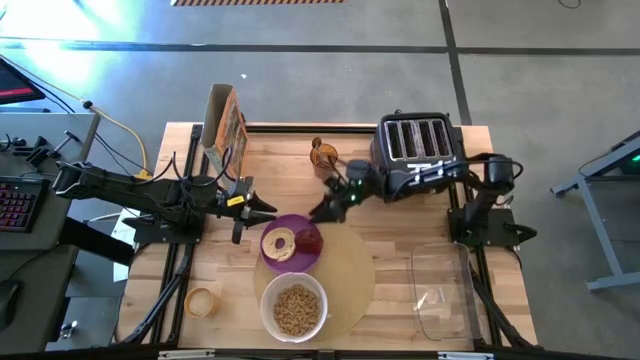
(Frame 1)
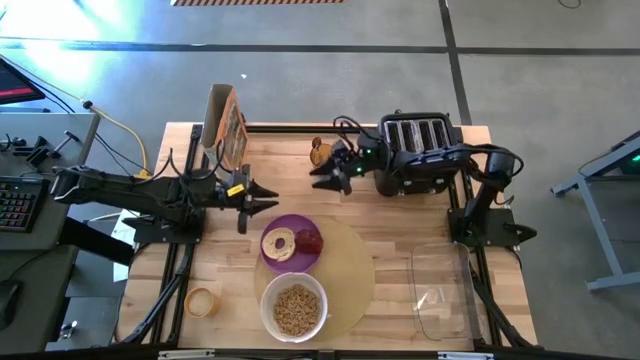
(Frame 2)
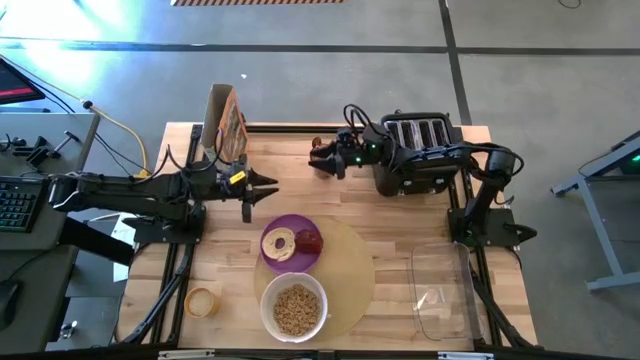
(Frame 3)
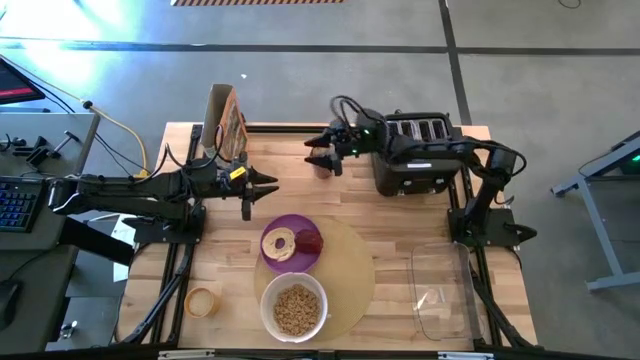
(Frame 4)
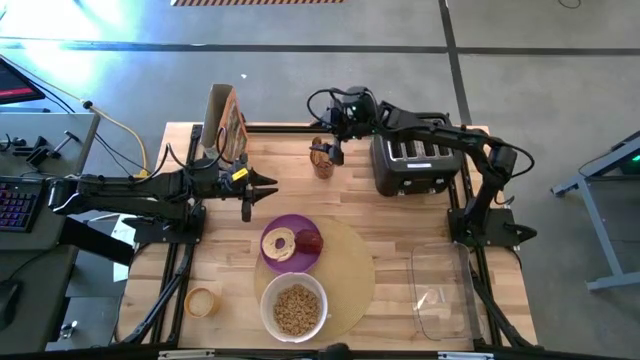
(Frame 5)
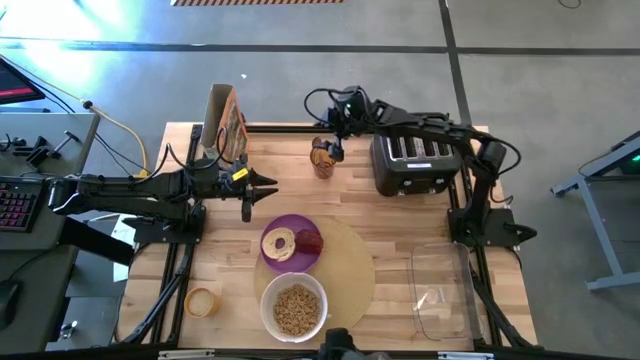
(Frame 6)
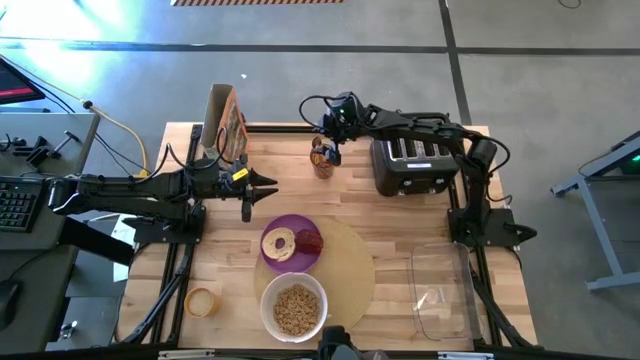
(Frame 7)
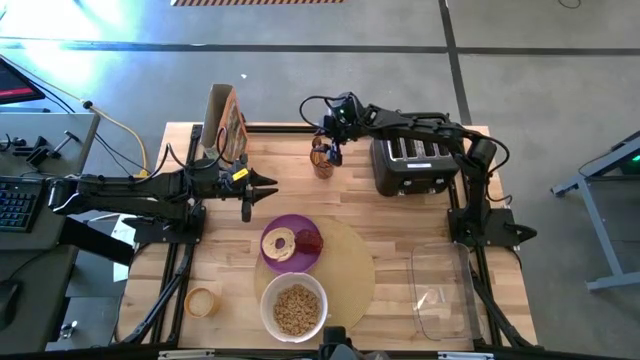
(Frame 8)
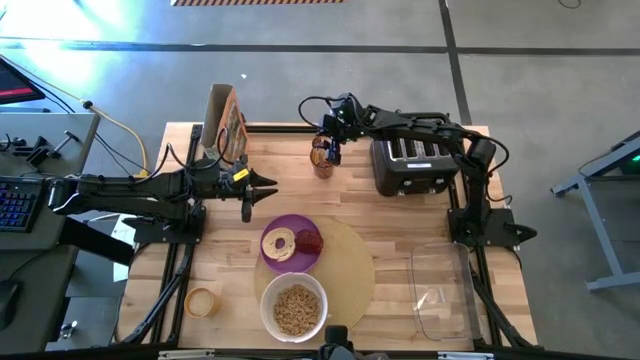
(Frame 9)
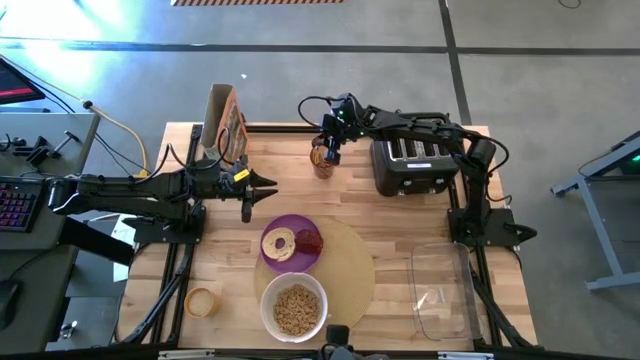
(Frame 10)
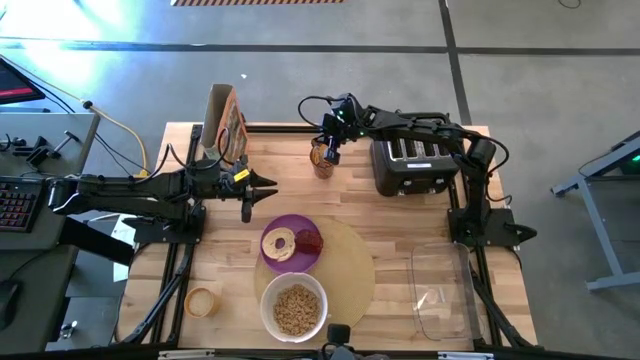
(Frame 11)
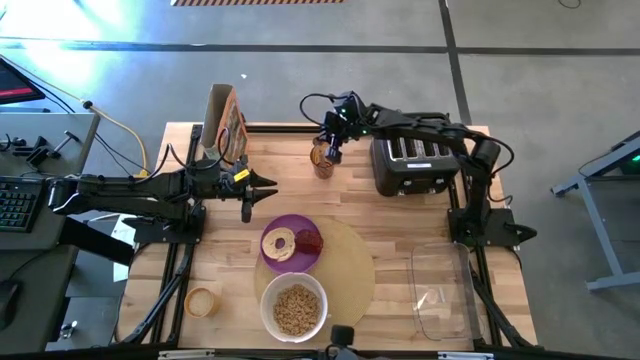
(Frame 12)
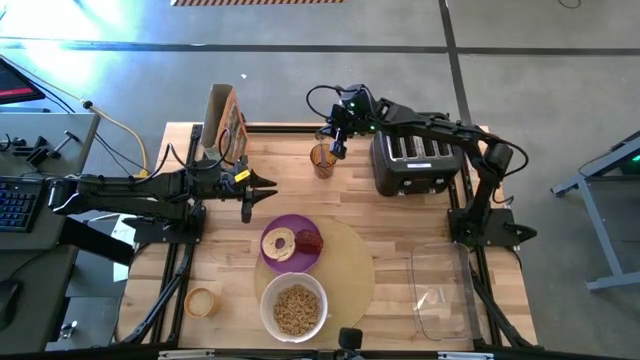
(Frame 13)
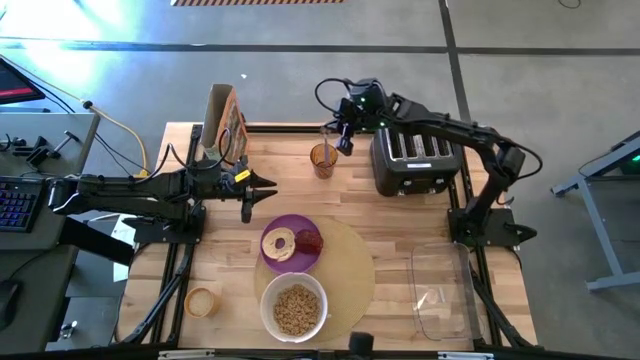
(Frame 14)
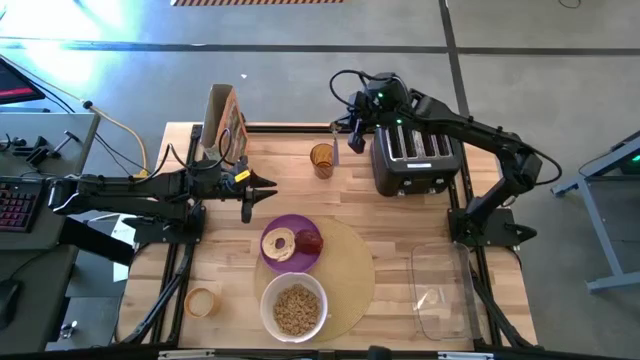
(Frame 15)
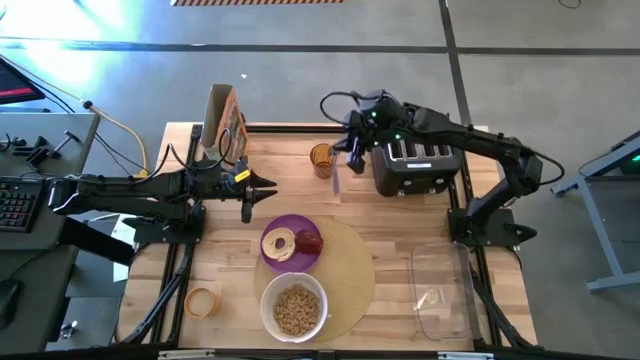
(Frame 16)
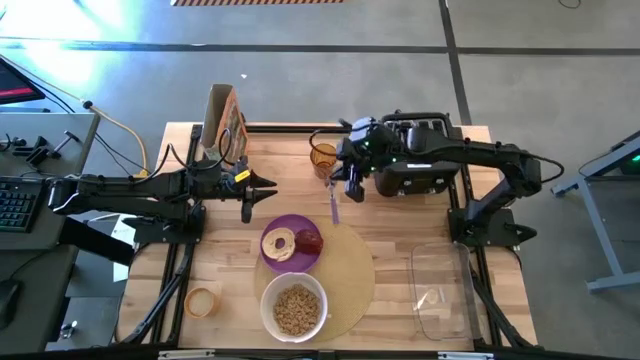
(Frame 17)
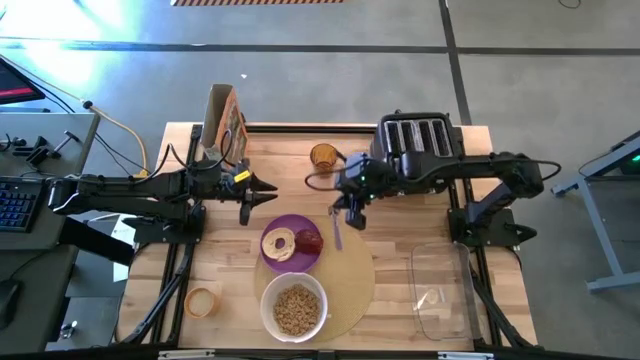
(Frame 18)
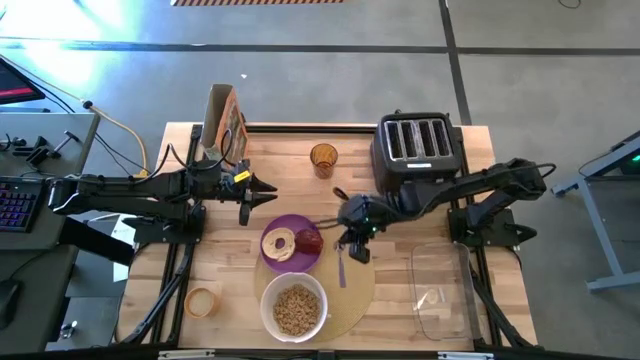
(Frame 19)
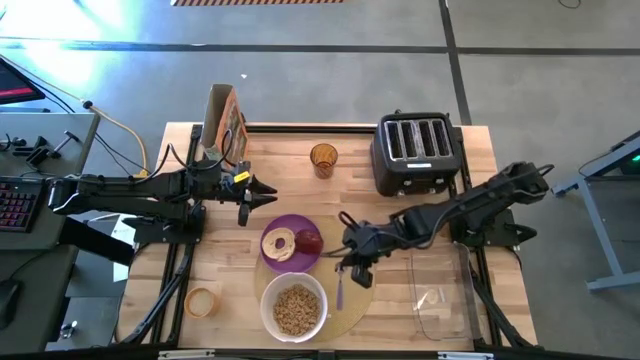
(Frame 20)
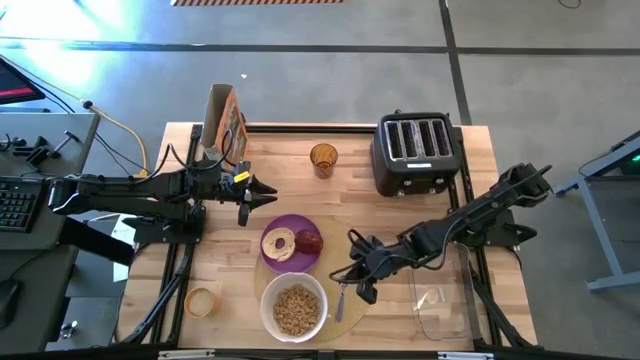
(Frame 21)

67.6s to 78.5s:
Task: Arrange a breakfast setting
Put the violet spoon on the yellow mat to the right of the white bowl

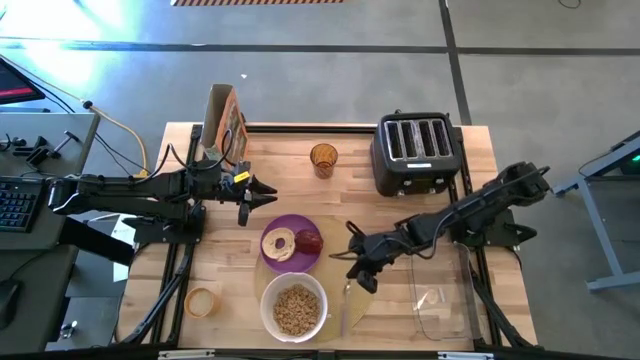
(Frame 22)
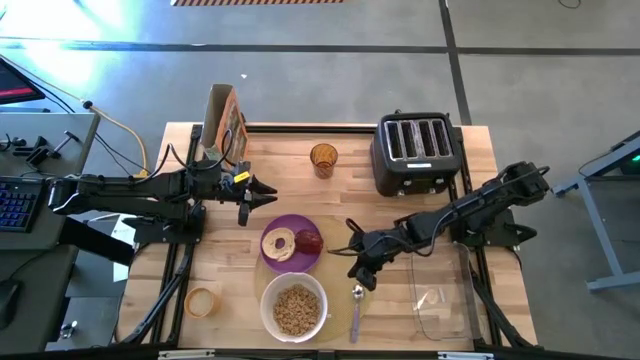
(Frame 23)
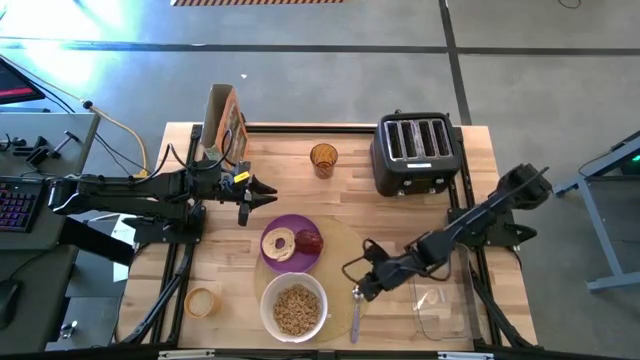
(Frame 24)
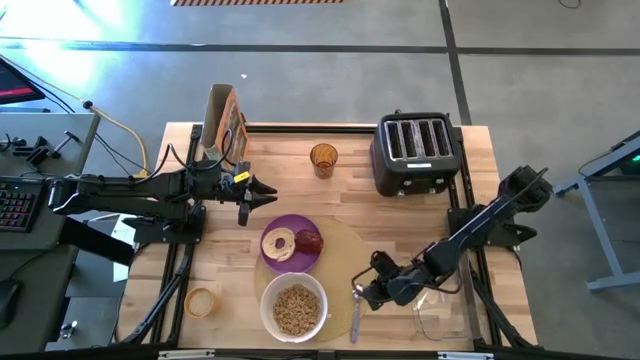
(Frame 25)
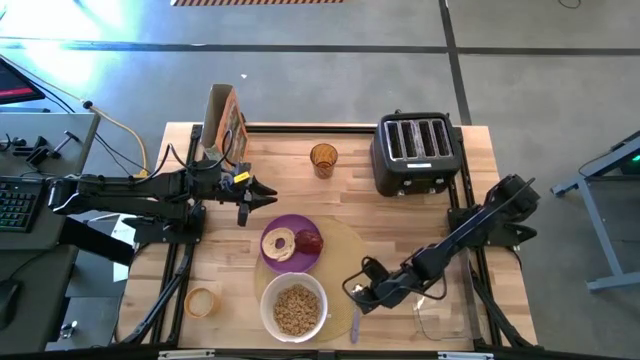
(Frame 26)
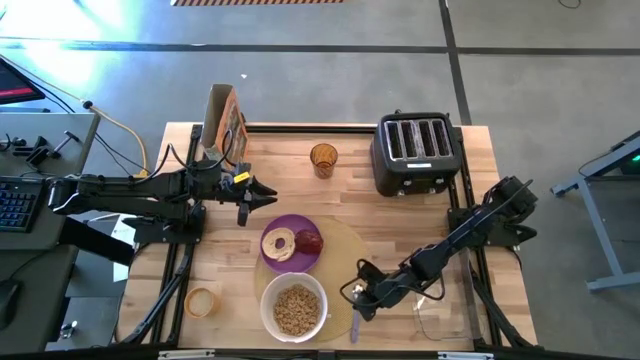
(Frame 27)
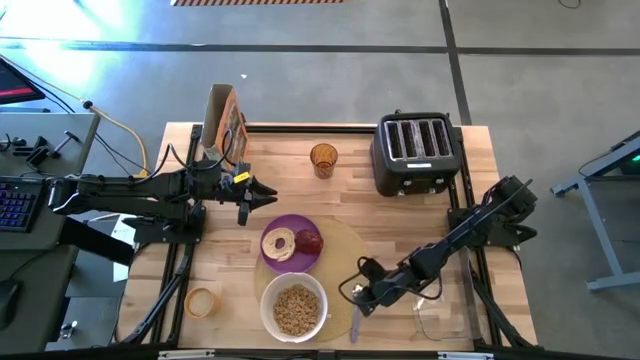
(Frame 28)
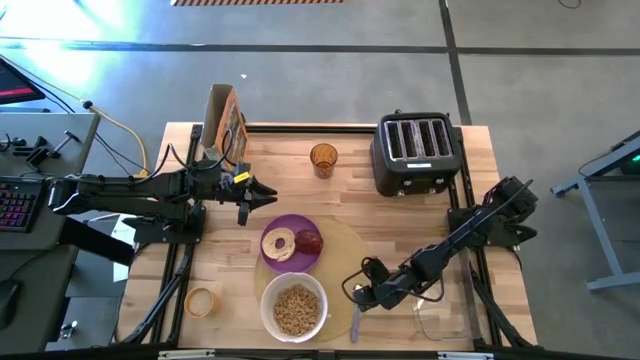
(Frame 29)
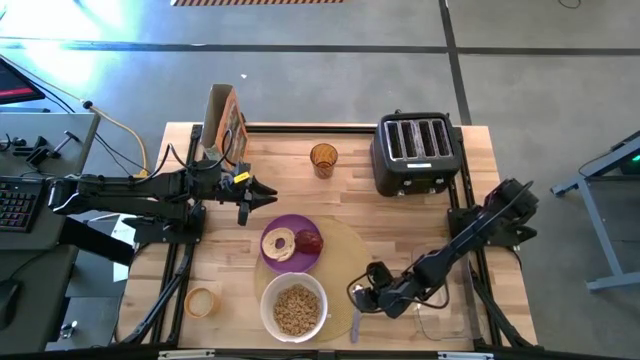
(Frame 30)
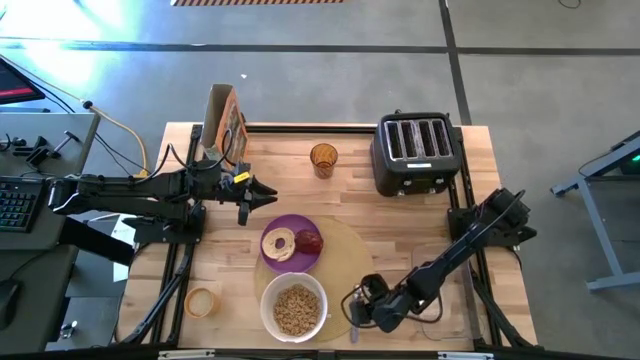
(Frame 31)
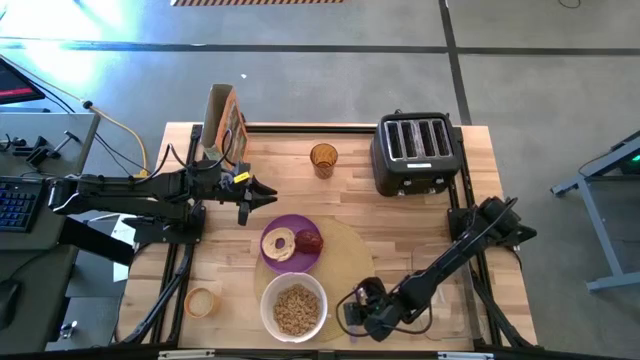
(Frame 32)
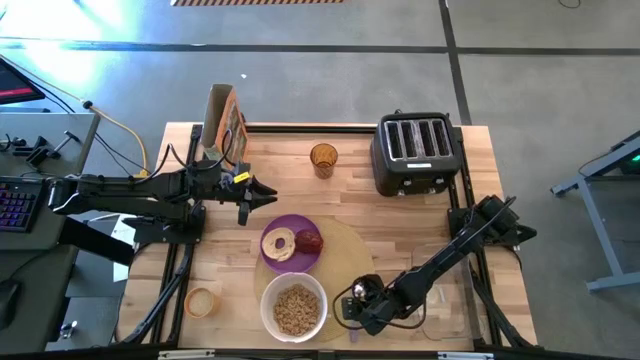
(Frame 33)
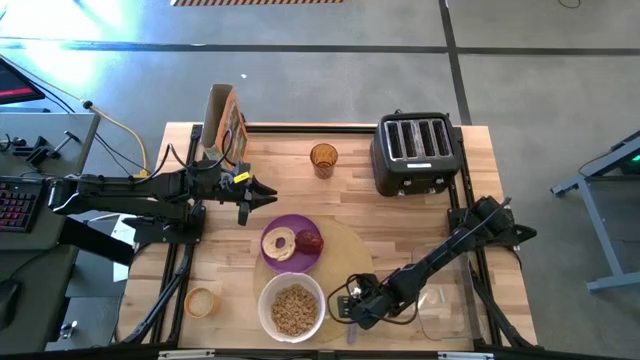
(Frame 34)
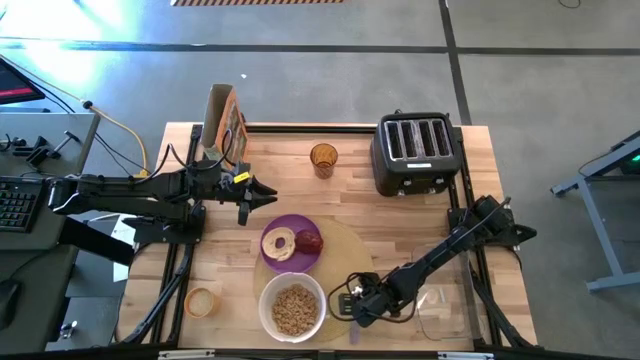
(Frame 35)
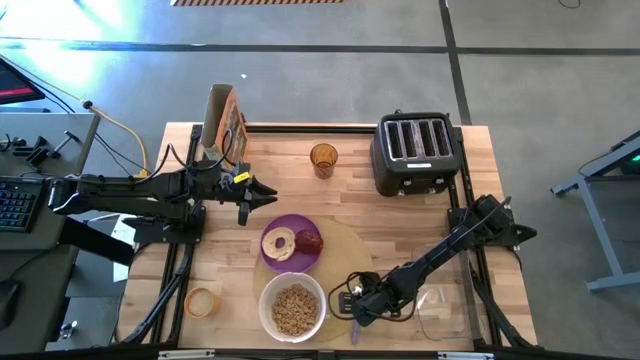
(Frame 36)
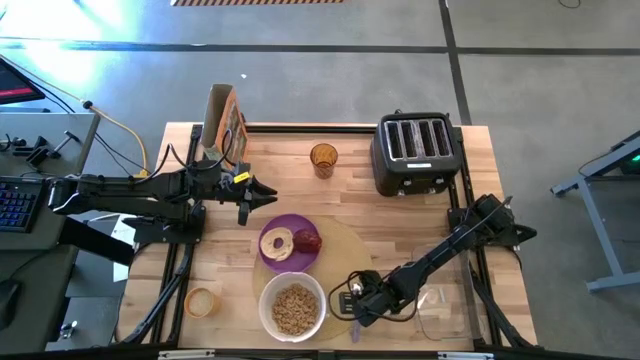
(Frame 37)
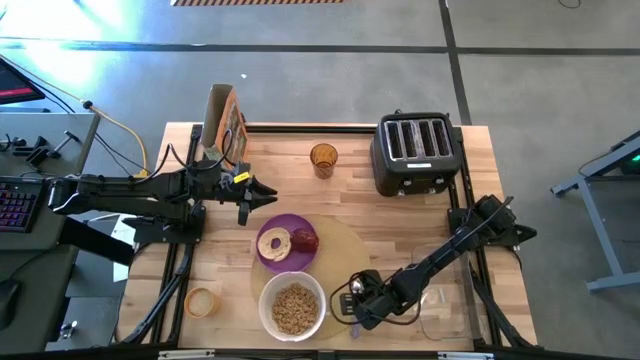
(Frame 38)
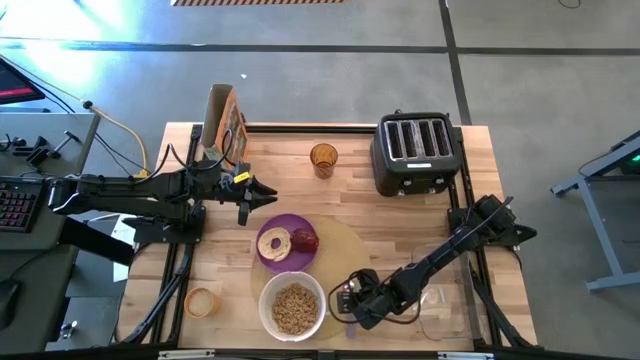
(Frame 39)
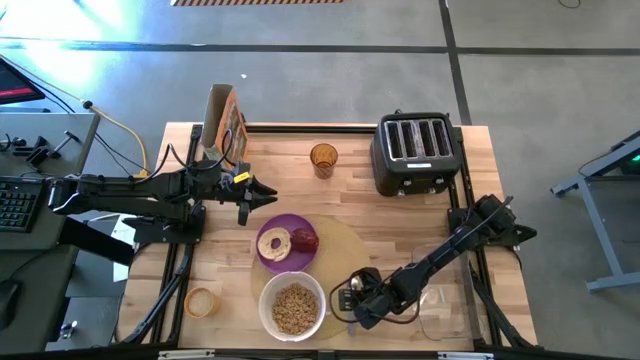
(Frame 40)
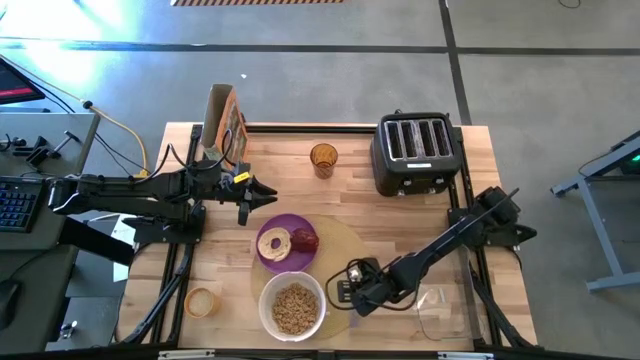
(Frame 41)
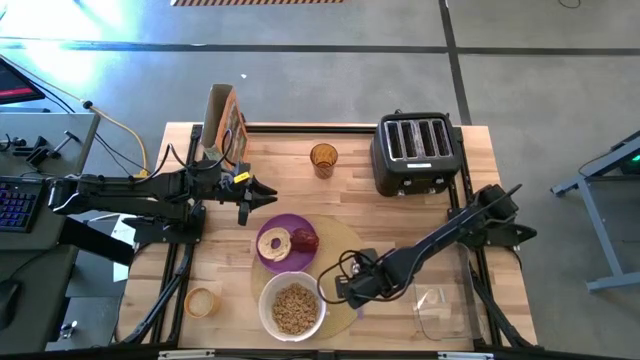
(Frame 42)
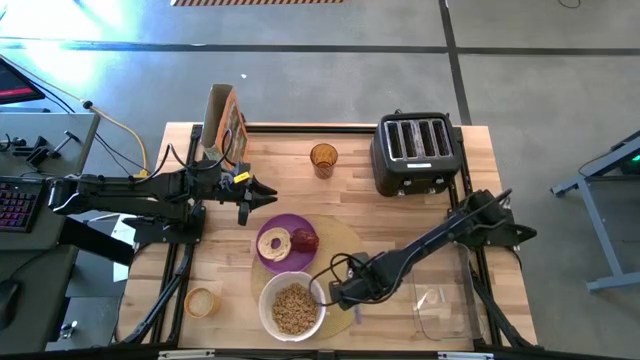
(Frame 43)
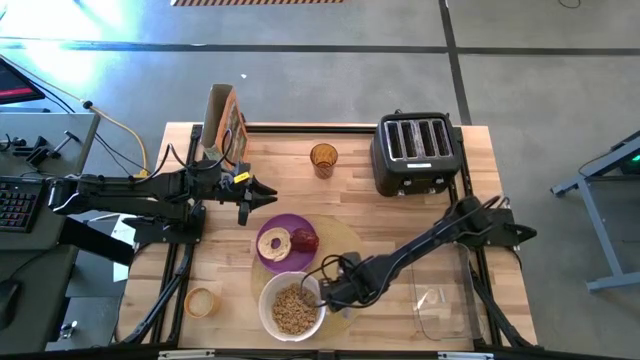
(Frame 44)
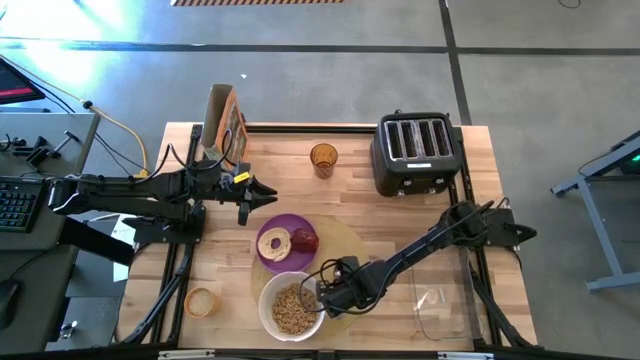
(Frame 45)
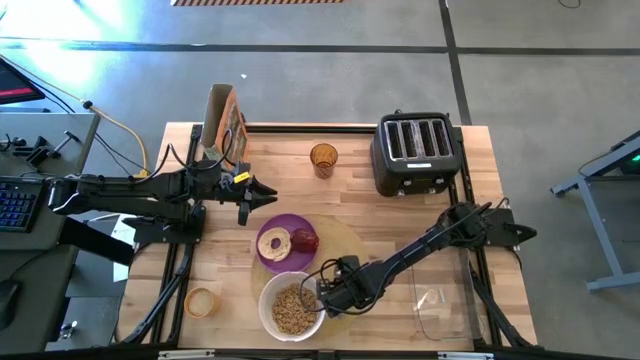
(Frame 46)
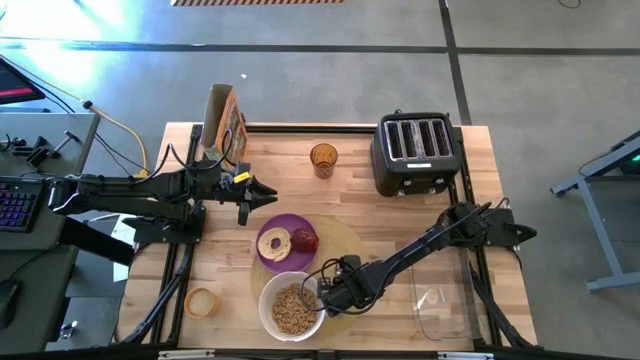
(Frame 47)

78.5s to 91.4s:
Put the violet spoon on the yellow mat to the right of the white bowl
